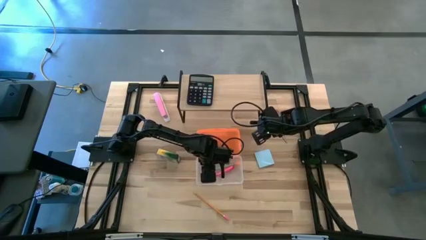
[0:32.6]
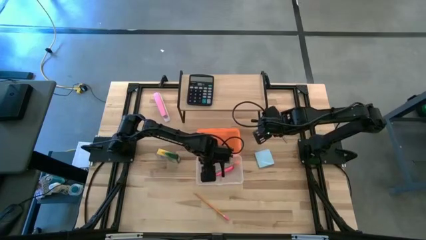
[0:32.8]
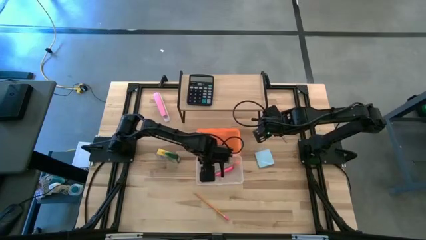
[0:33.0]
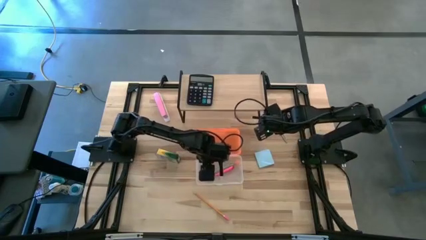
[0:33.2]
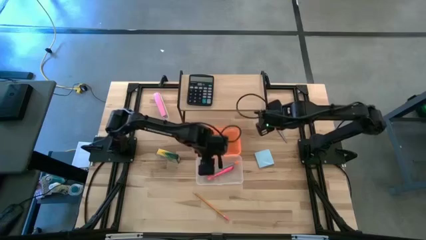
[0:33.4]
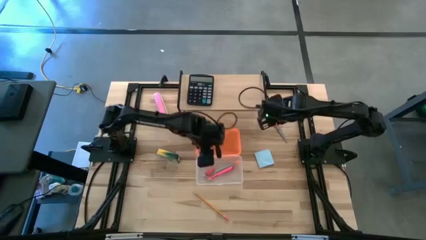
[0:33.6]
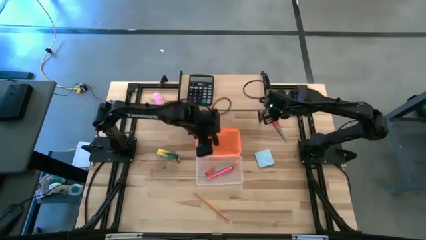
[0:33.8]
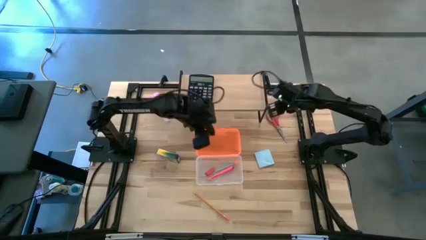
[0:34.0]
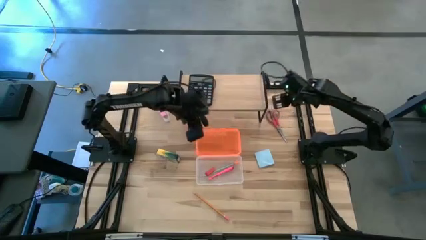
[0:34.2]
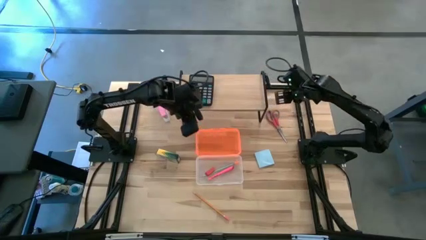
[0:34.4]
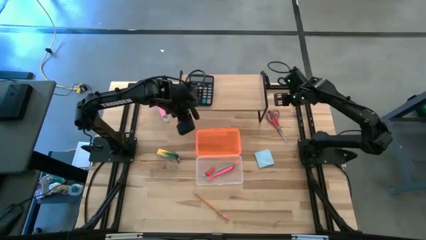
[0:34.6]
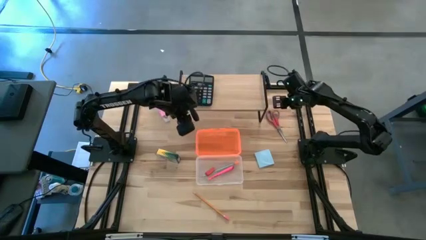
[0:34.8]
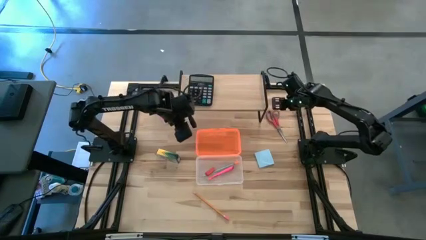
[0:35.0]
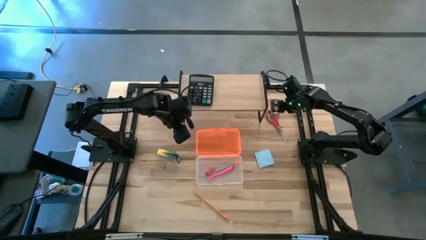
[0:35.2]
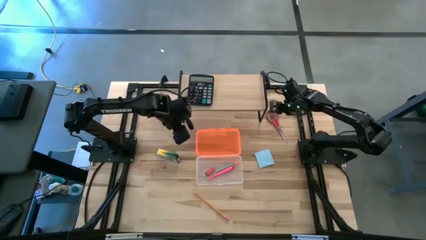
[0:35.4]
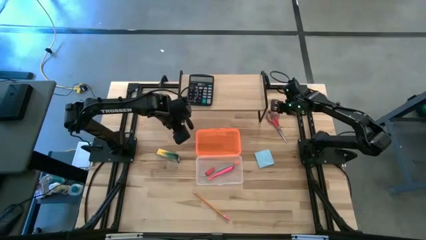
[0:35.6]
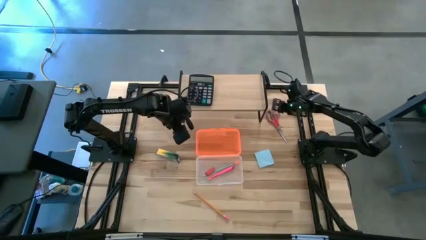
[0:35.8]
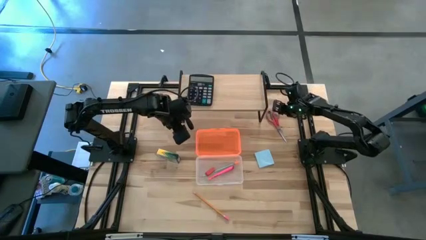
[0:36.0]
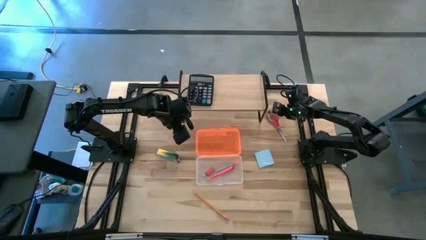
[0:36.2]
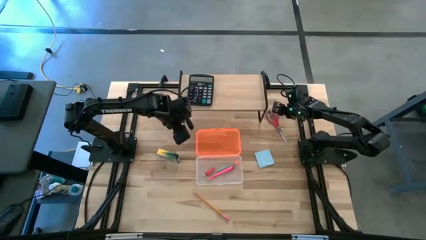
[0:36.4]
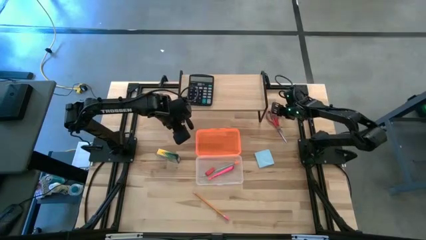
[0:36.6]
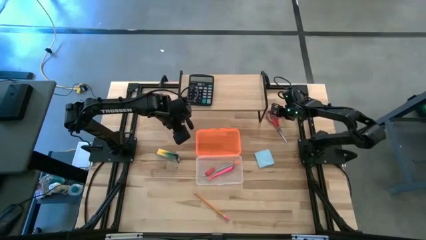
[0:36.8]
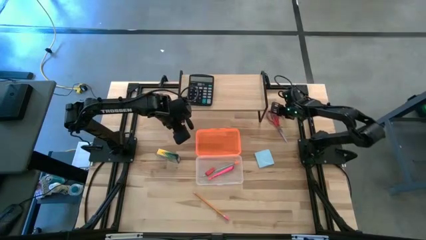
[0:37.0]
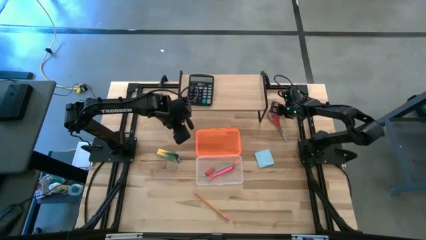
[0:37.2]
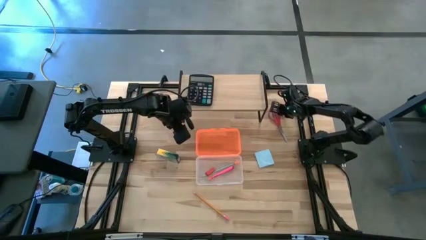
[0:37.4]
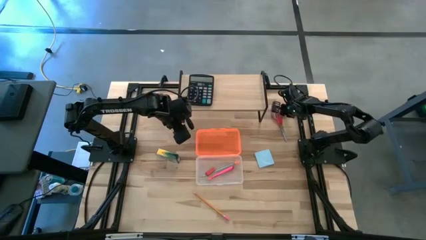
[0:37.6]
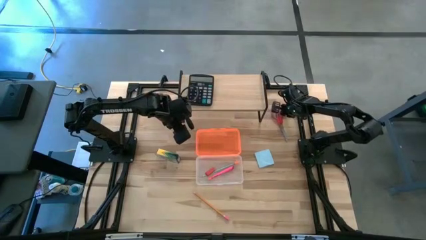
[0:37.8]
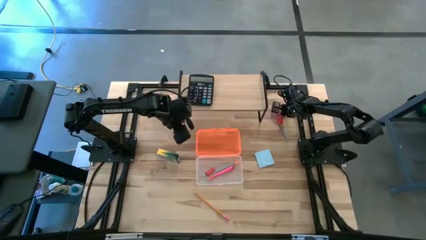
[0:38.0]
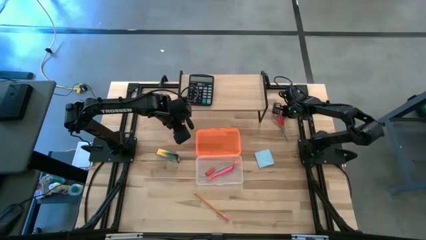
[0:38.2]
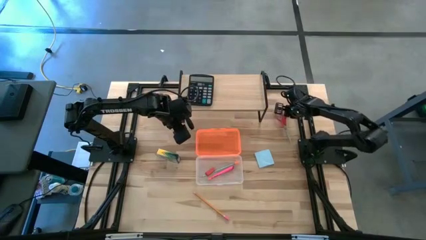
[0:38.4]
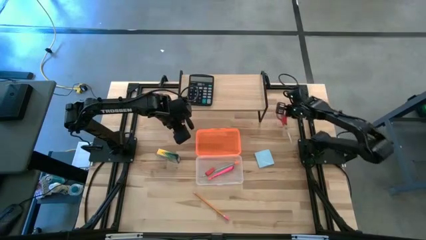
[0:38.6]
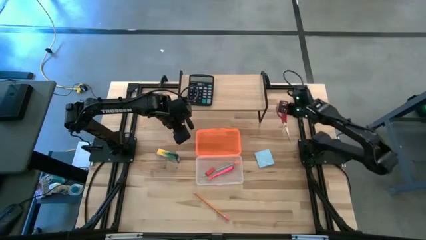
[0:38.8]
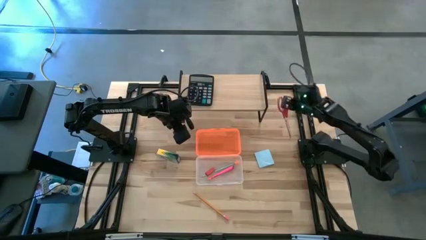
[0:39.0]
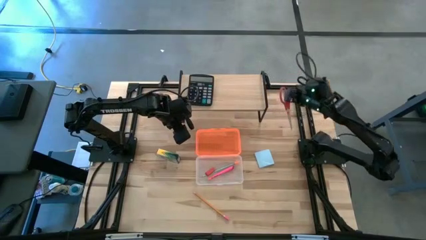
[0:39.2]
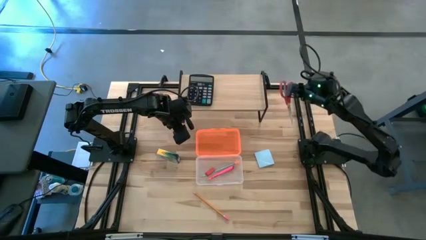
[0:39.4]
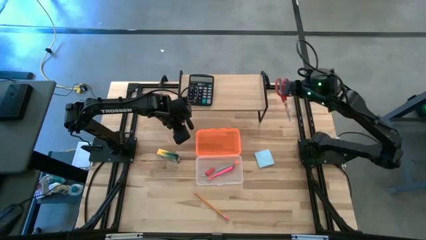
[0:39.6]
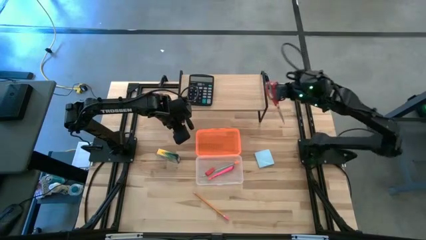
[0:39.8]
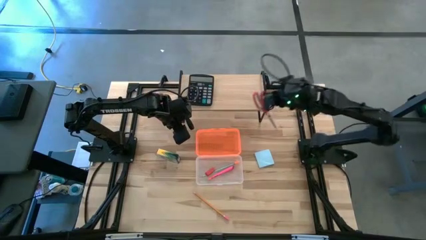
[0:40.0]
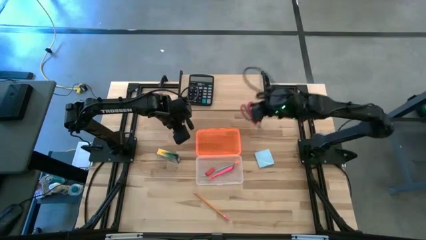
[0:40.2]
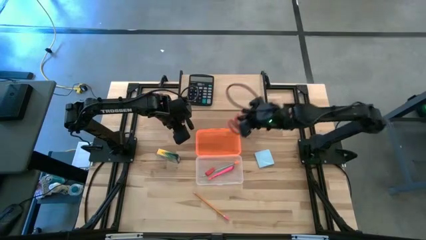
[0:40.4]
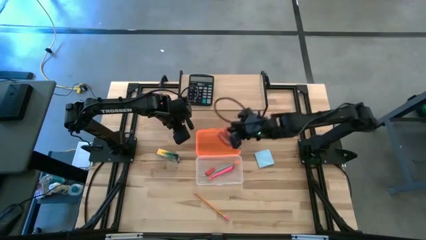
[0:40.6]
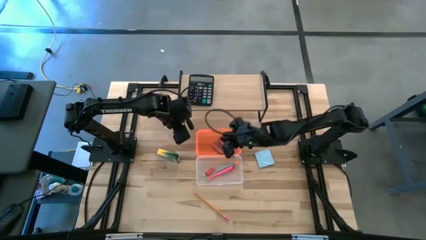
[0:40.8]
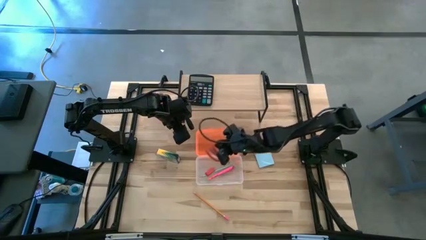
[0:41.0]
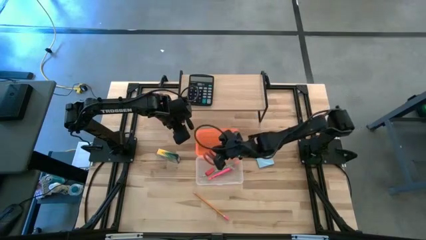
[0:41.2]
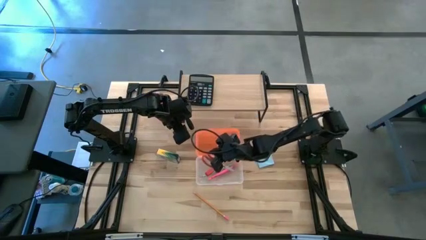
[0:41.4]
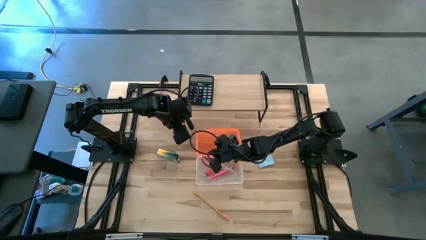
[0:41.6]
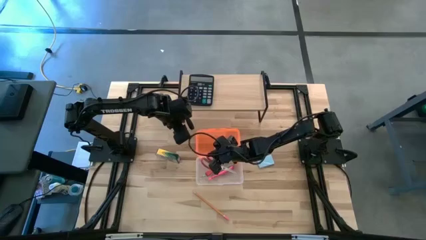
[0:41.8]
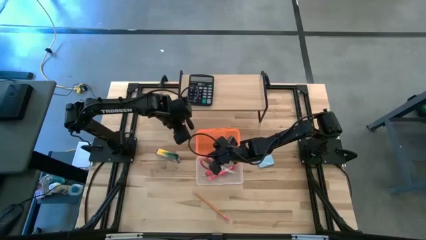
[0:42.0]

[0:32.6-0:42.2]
Task: Pack school essentials
Put the red scissors into the orange supply box

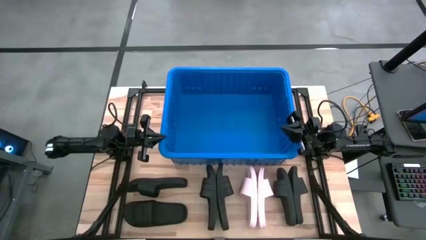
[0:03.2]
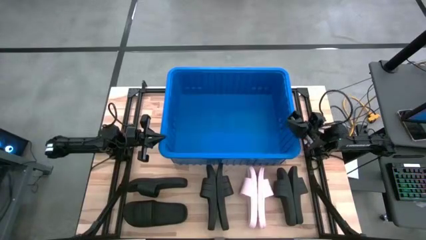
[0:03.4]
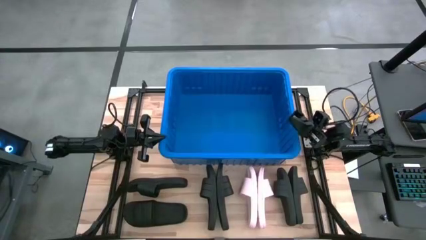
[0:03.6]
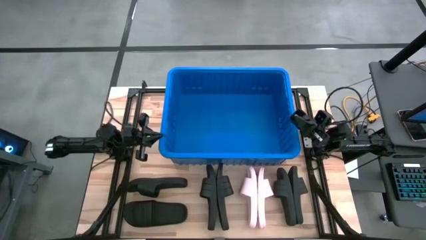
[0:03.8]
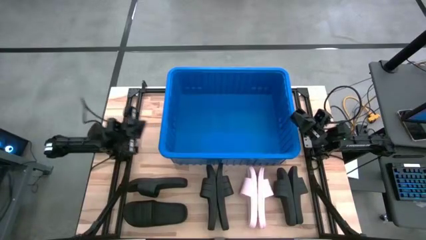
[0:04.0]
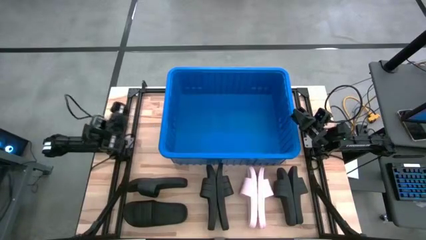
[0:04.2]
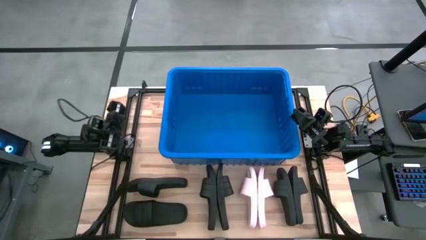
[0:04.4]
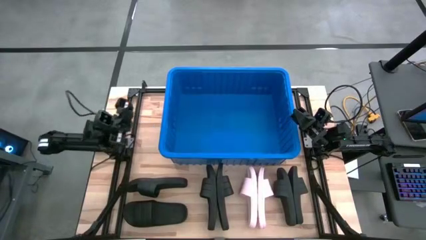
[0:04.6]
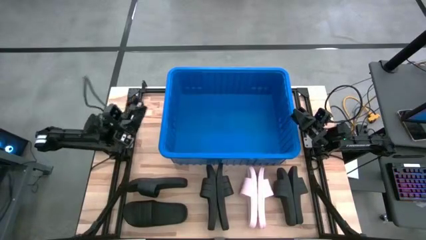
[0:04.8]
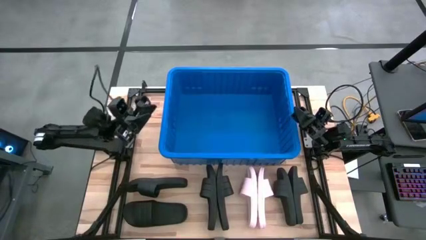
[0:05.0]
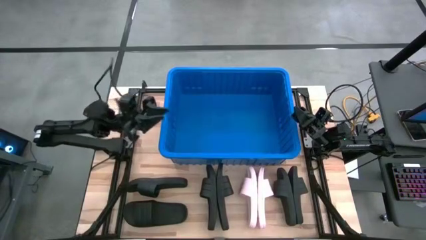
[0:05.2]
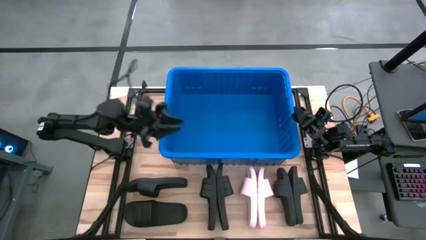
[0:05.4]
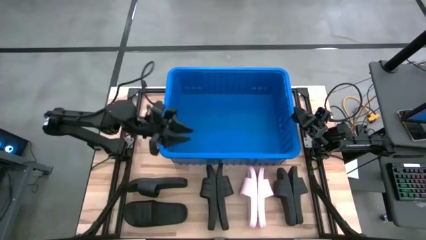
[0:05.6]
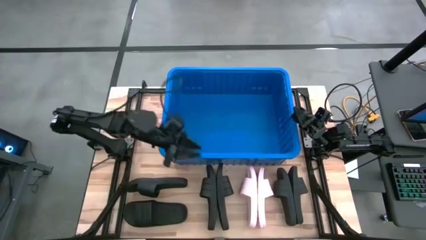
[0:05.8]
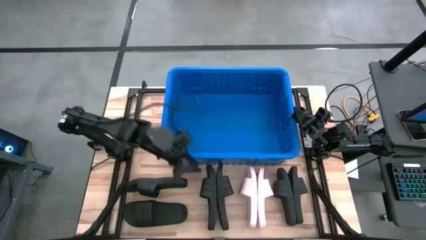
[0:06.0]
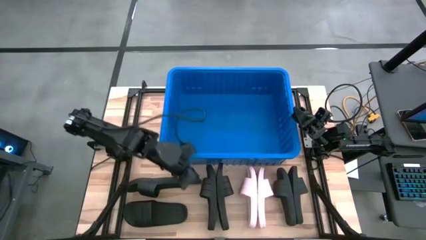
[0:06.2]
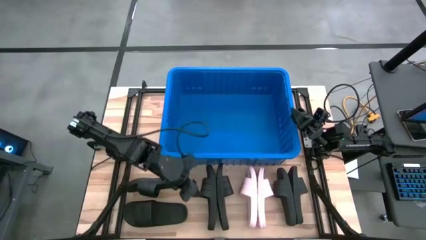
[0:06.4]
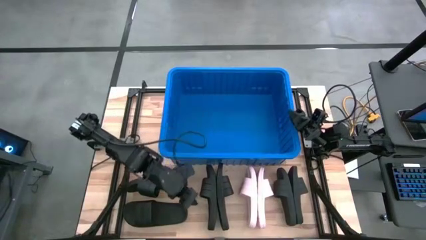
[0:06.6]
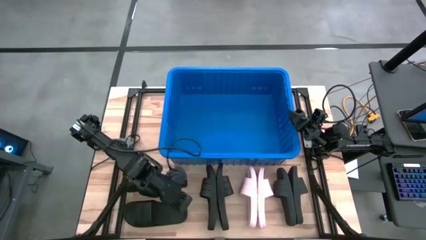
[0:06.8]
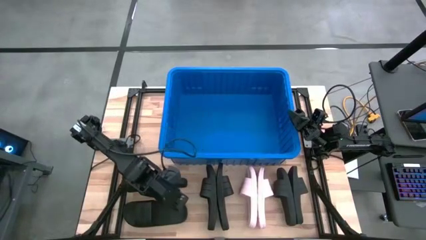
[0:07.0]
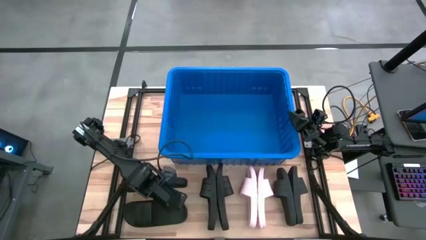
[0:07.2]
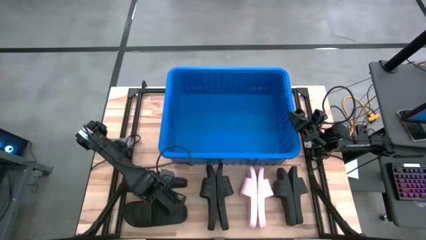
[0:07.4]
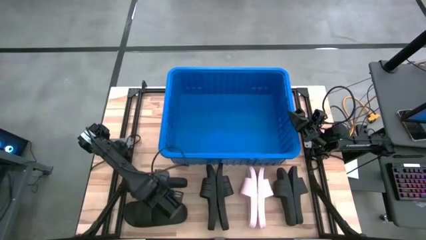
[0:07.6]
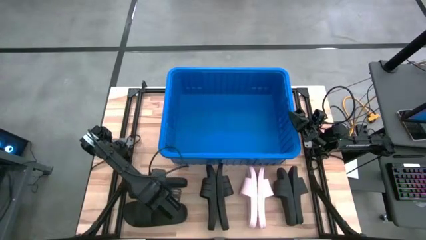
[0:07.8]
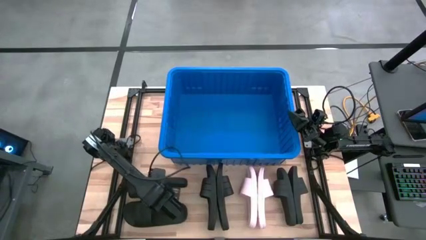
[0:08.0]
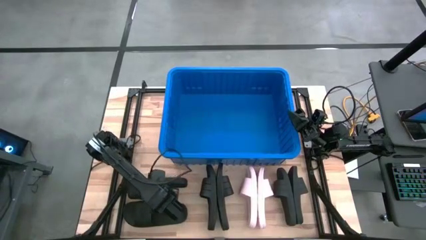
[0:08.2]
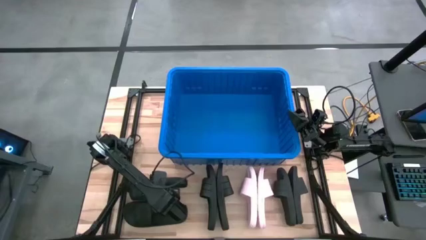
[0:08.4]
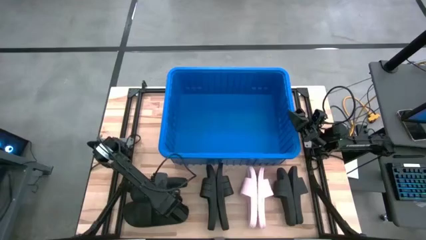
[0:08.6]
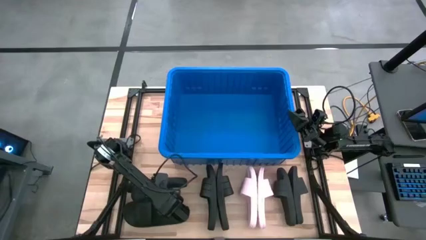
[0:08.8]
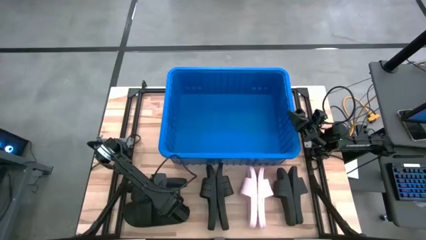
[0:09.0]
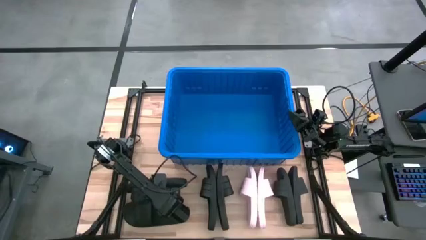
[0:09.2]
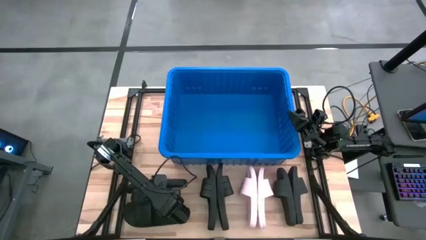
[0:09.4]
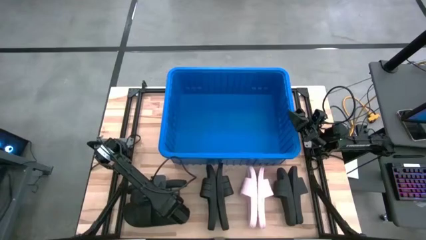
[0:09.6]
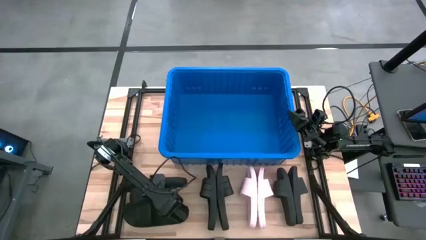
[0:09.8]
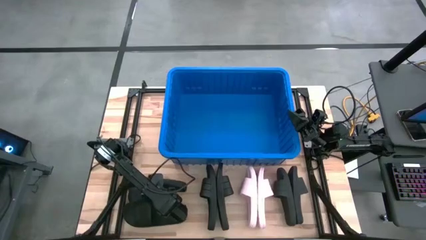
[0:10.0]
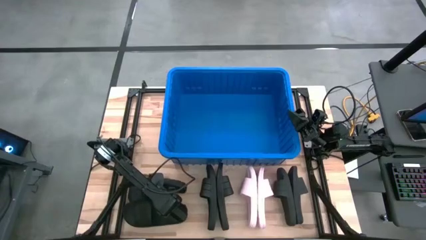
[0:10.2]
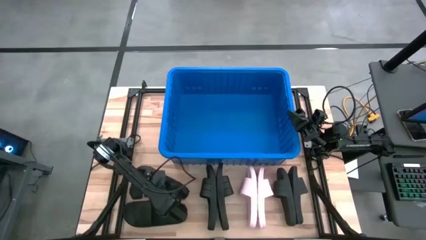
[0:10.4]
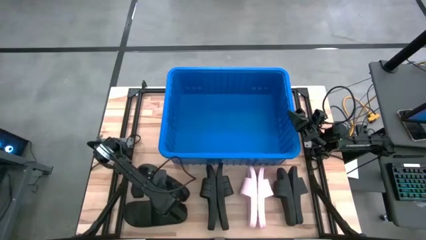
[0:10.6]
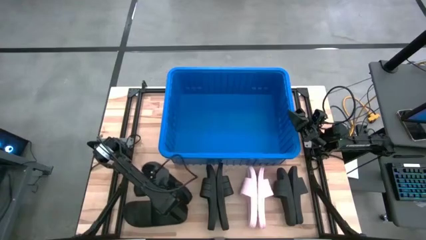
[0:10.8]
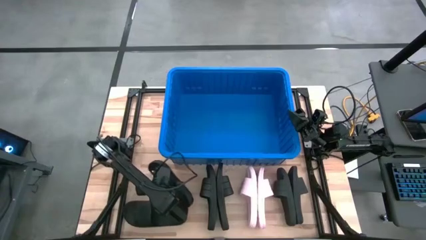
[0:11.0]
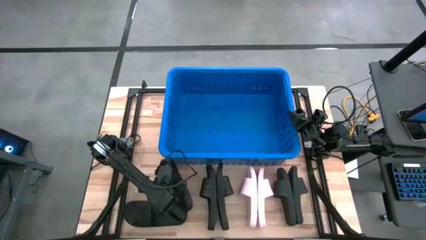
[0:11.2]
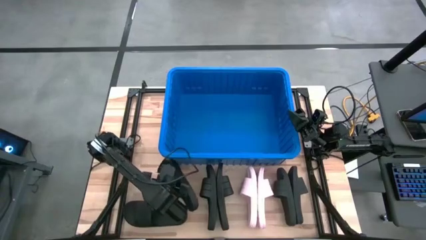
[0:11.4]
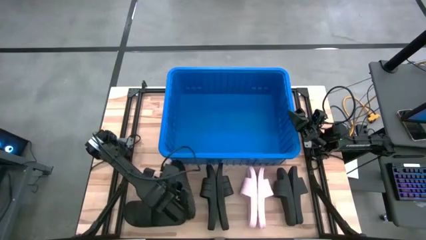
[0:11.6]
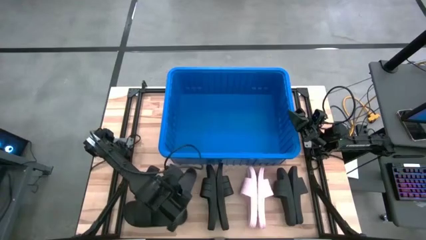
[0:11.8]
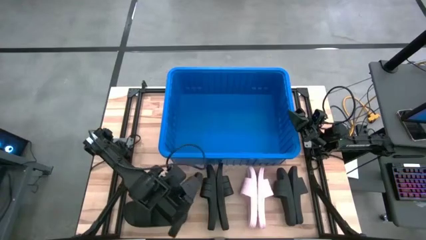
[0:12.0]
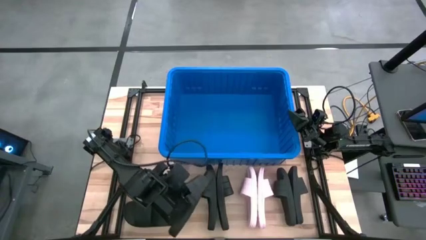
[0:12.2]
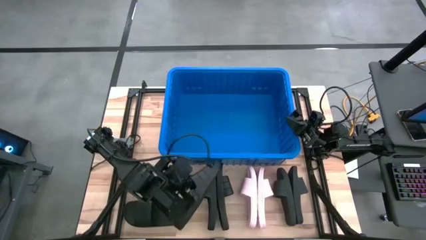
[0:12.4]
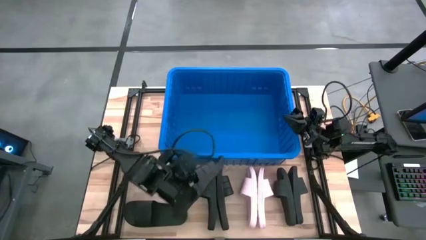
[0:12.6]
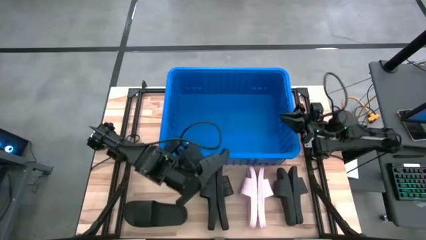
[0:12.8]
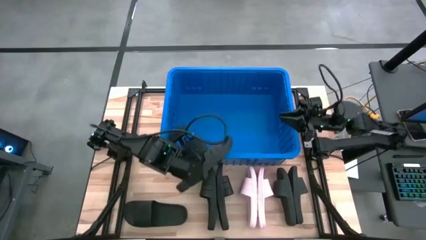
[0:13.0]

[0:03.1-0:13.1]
Task: Pick and place slides into bin
Put the black slide into the blue bin
